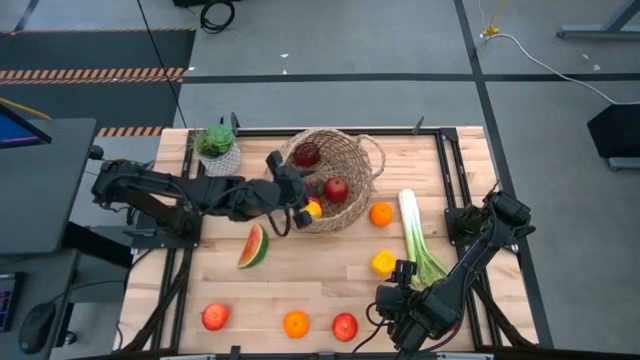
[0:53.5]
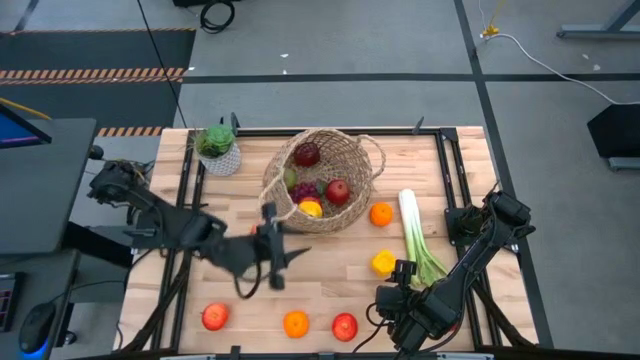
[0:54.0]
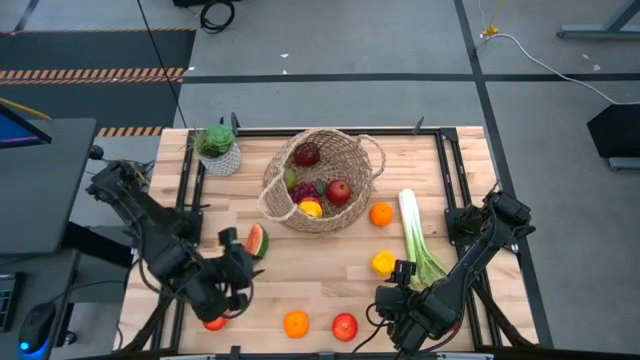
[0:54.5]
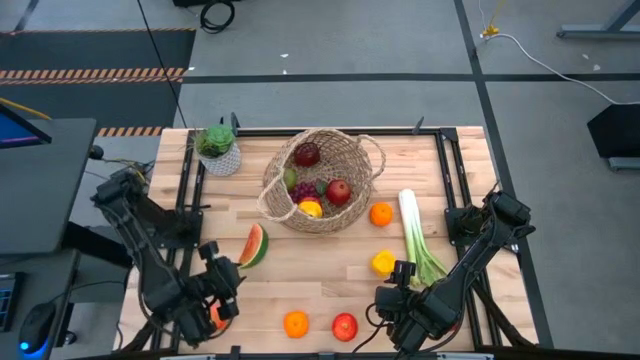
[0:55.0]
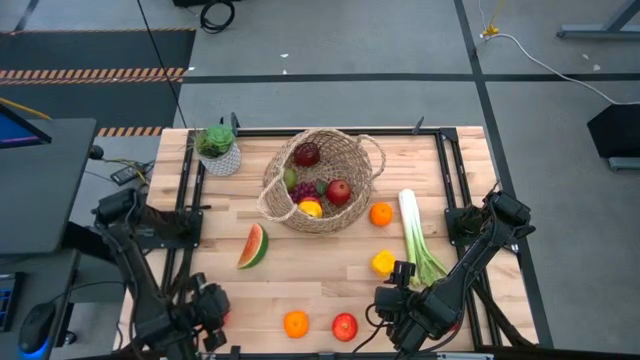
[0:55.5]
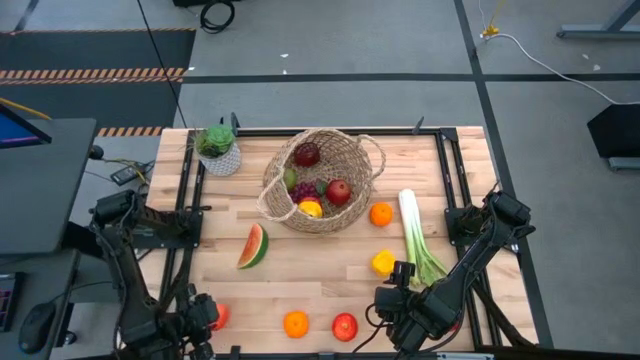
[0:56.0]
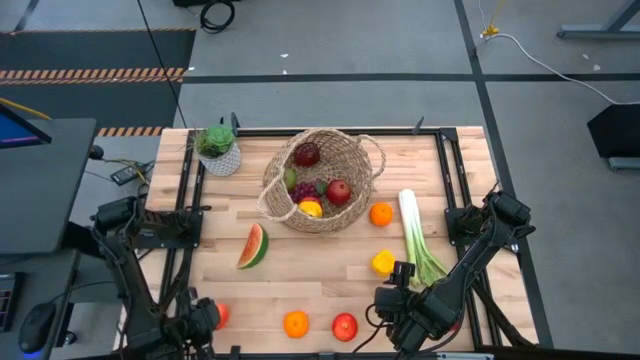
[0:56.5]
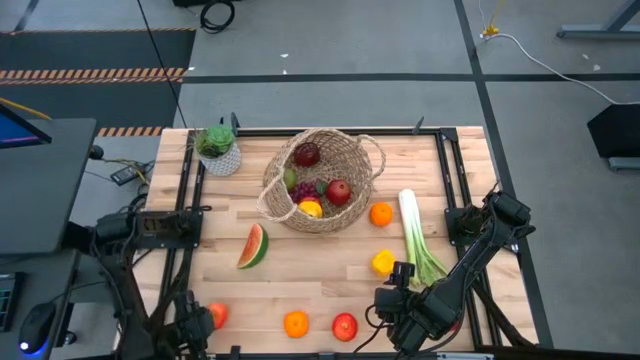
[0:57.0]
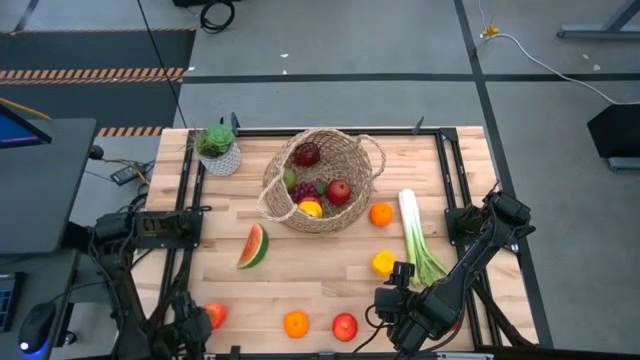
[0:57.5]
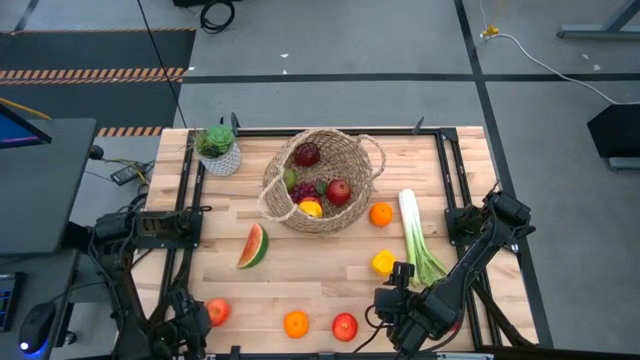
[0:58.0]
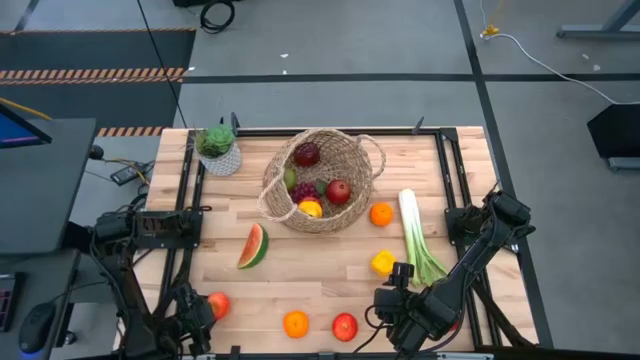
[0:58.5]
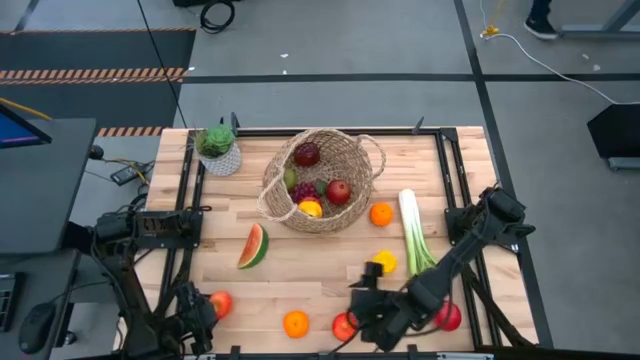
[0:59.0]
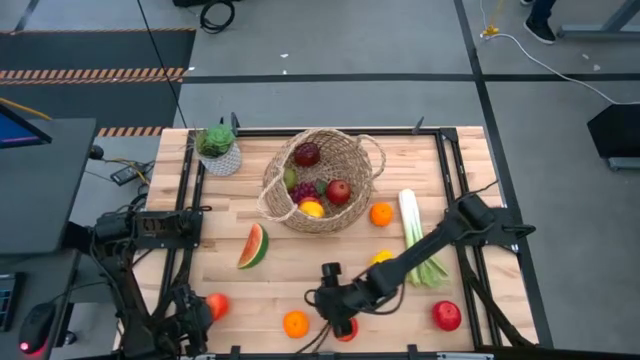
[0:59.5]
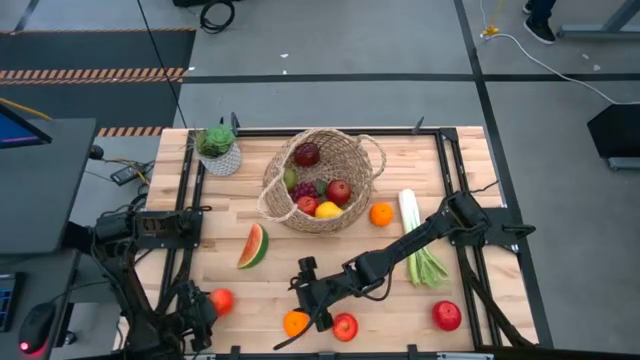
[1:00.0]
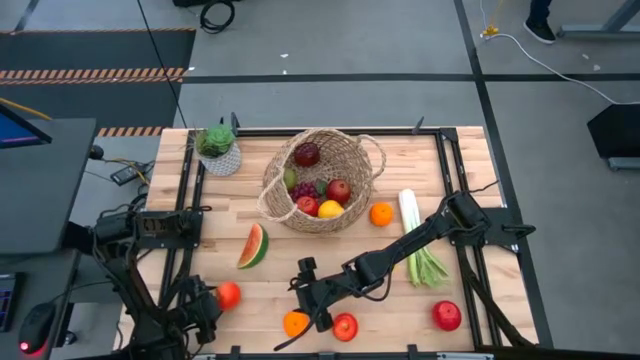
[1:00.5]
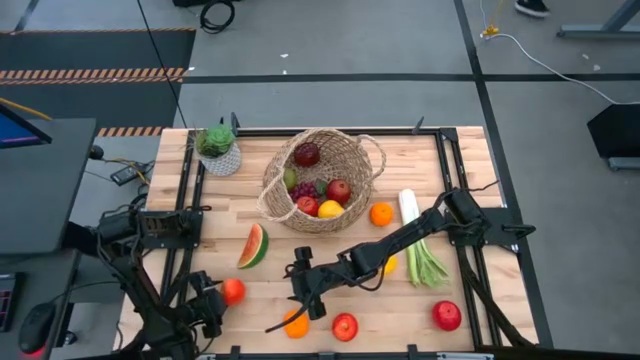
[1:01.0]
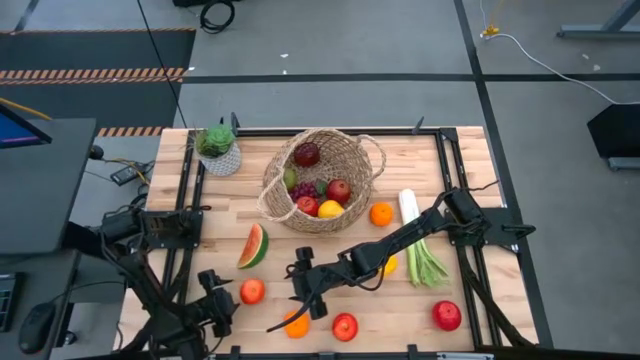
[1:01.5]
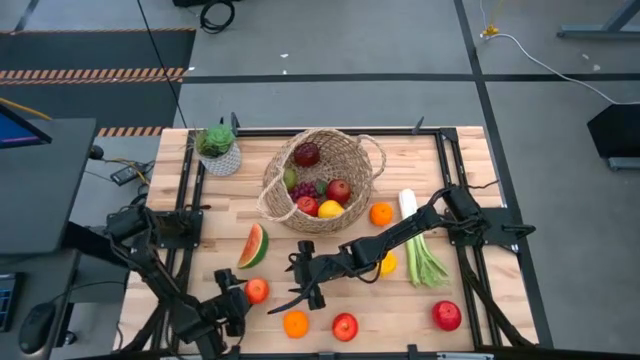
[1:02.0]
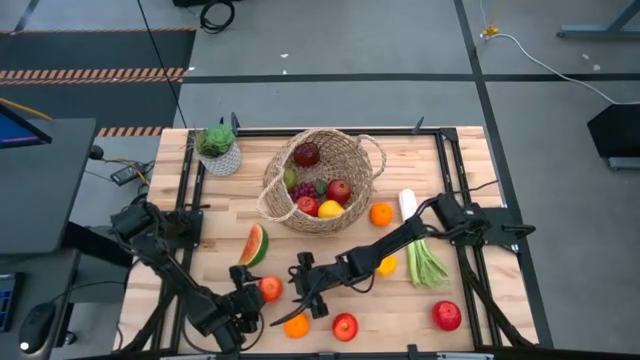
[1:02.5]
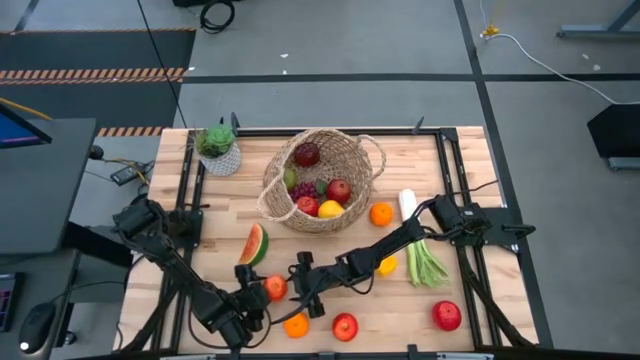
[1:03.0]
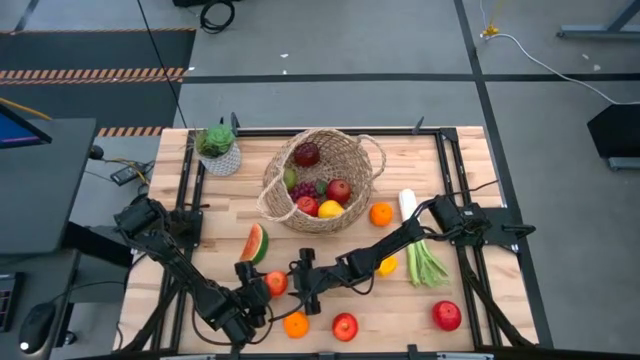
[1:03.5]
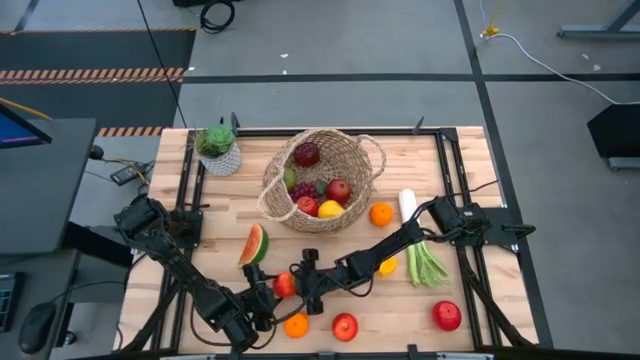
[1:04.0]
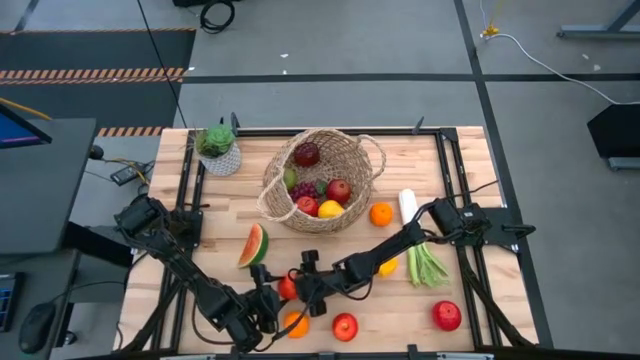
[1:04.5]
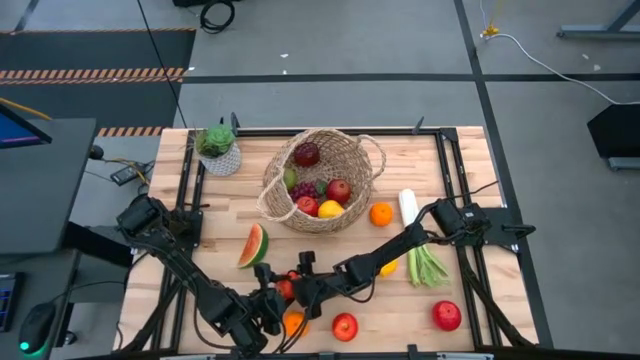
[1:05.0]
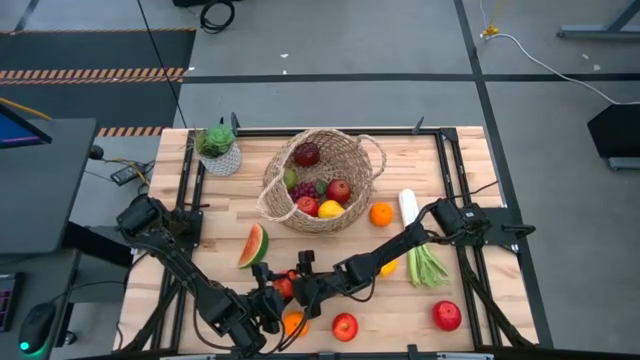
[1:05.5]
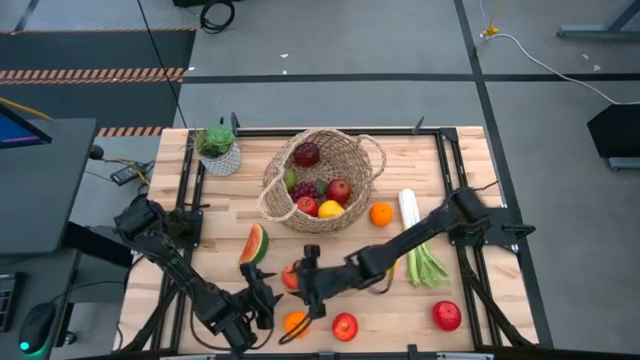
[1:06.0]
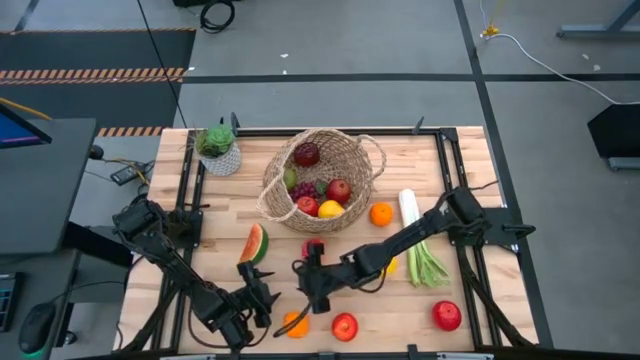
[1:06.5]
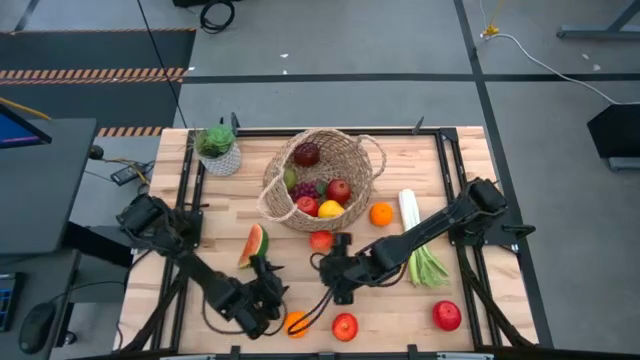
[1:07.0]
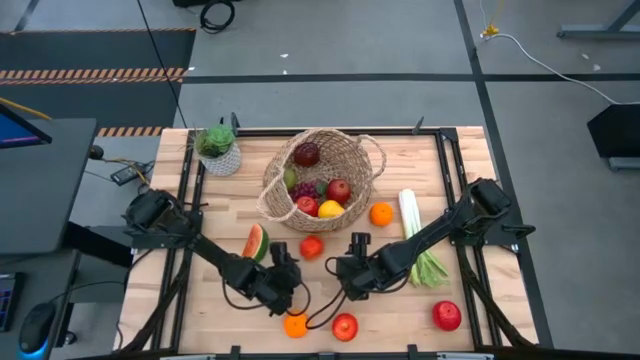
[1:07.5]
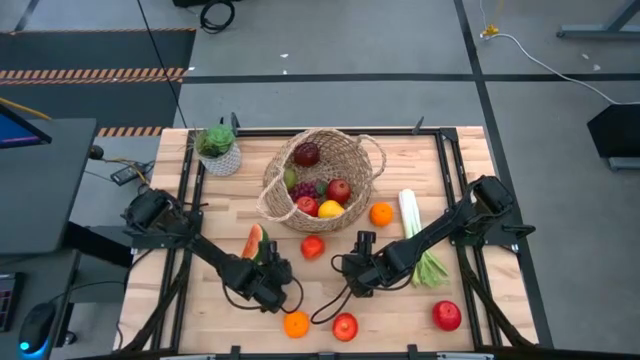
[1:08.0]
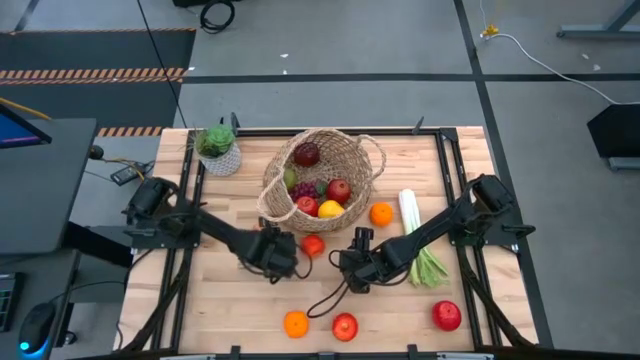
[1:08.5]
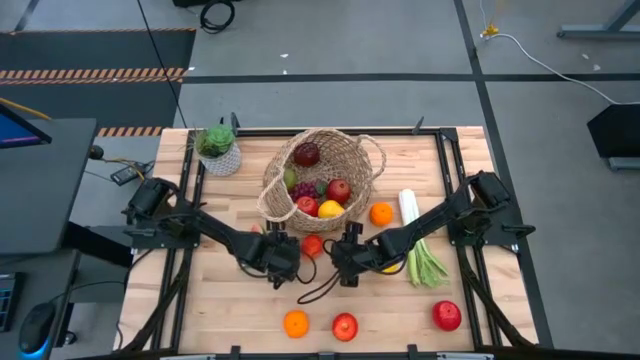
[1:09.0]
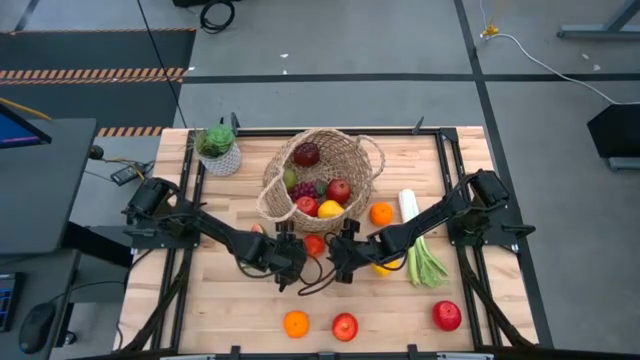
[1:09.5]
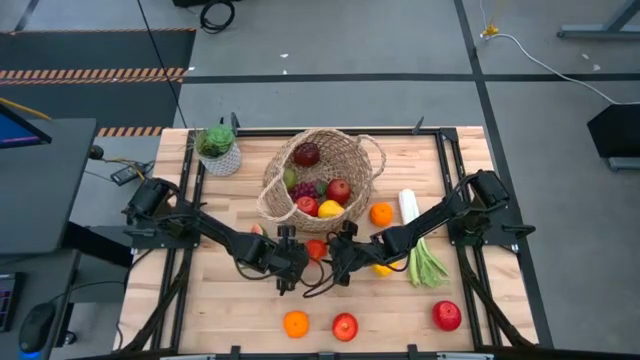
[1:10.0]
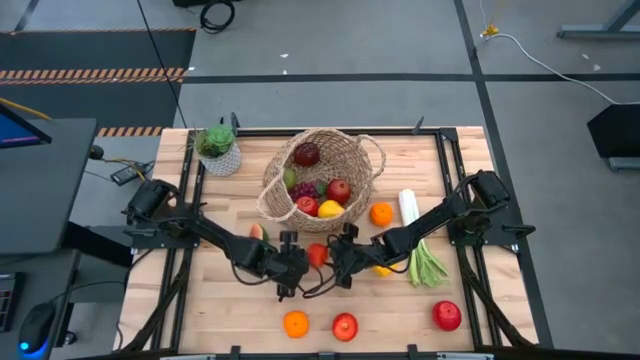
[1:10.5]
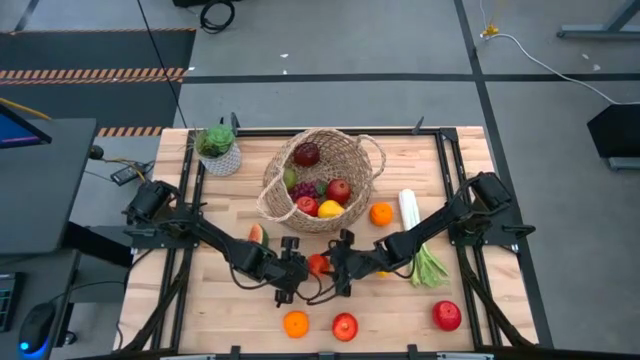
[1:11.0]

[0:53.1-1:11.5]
Task: Build produce basket
Put the apple into the basket

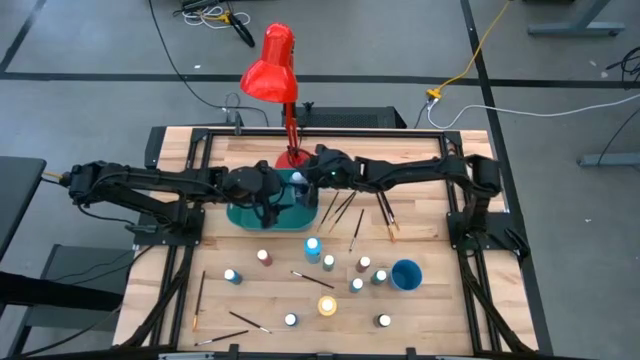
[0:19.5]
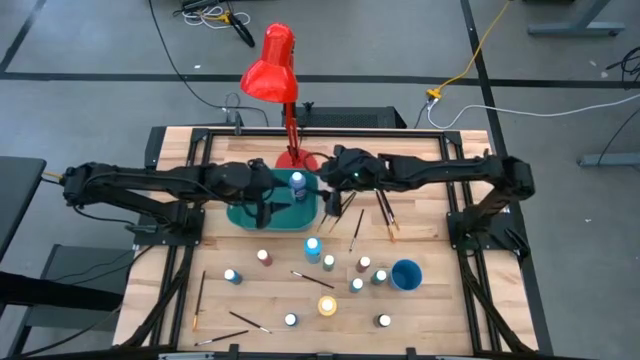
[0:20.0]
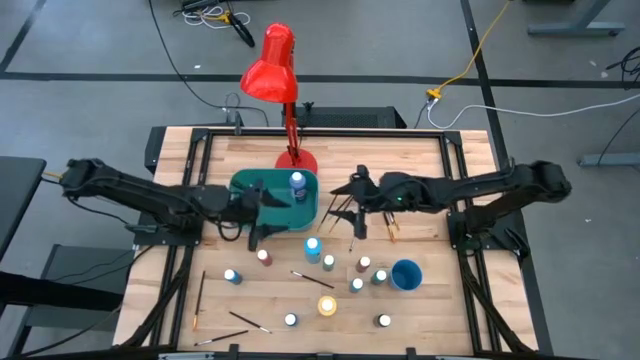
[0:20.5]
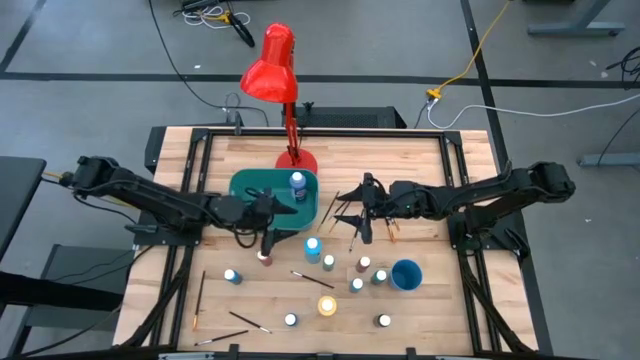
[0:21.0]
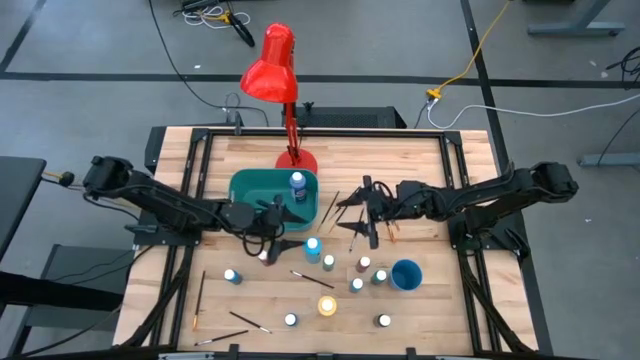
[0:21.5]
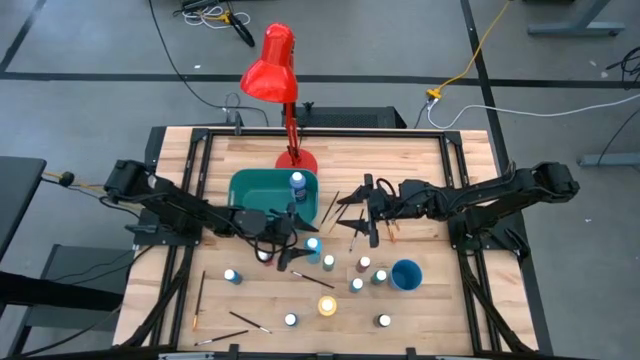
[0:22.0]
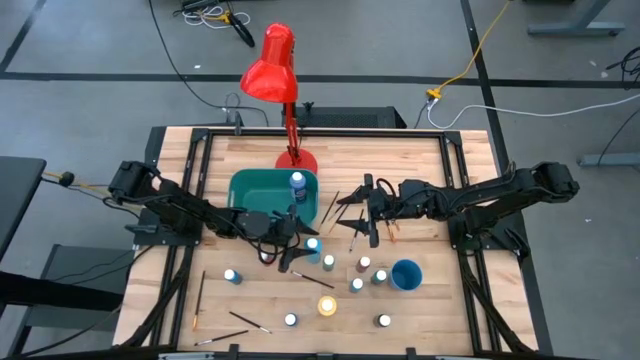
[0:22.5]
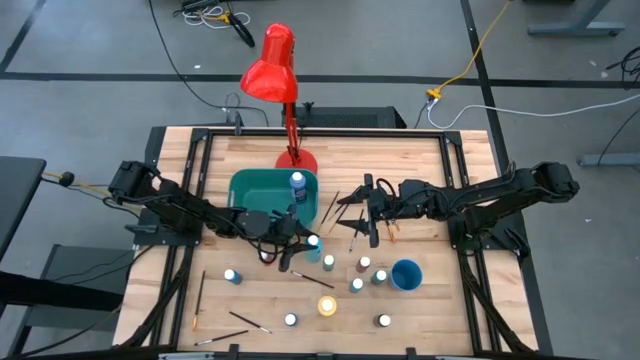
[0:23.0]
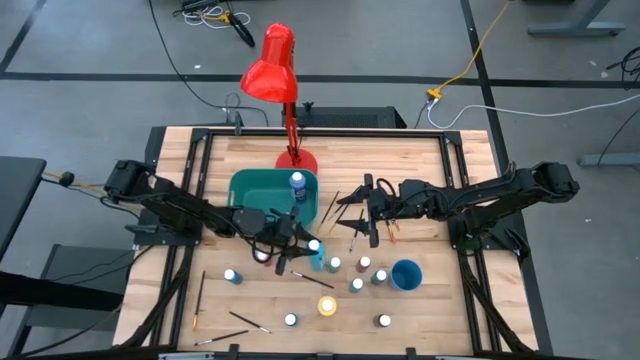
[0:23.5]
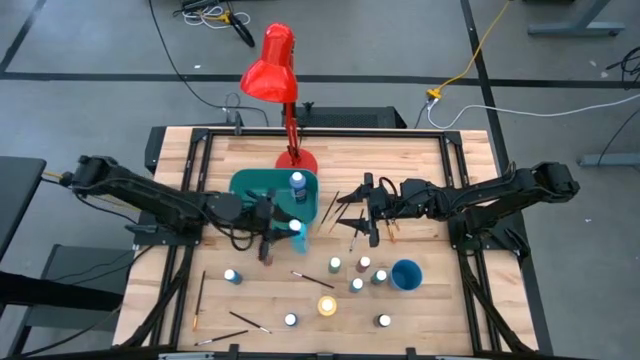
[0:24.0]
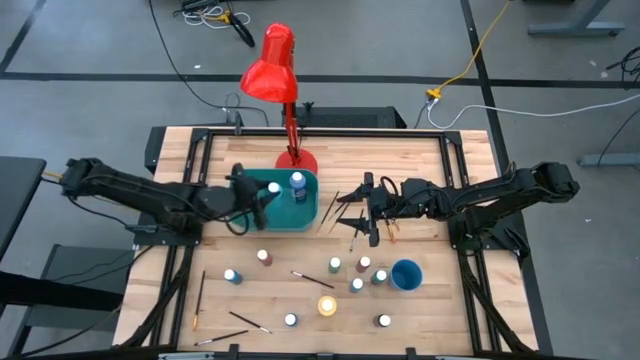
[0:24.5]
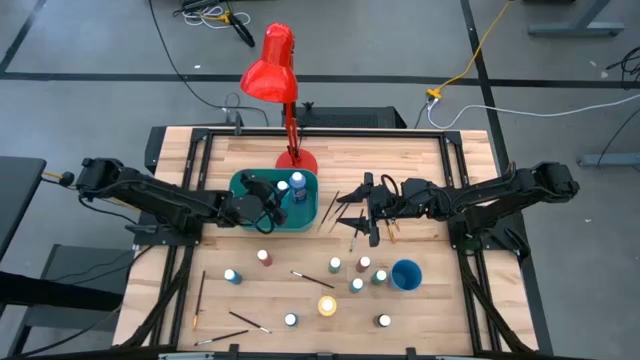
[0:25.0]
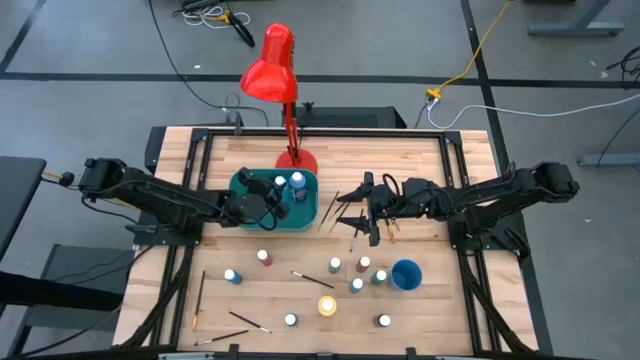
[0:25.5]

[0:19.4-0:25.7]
Task: Pick & Place Paint Supplies
Put the large light blue paint bottle into the green bin
